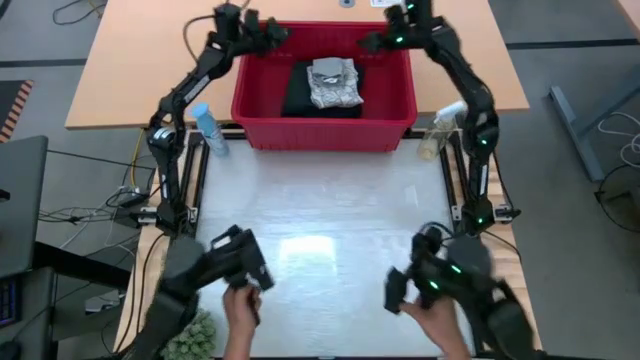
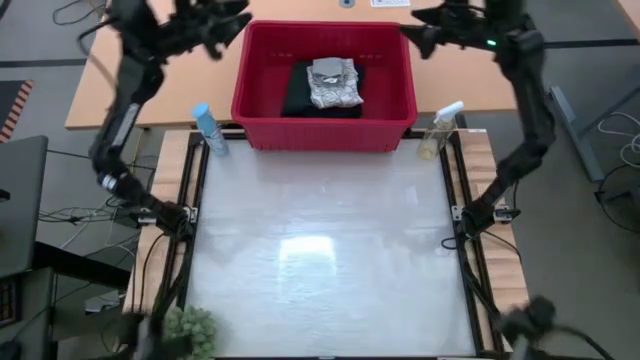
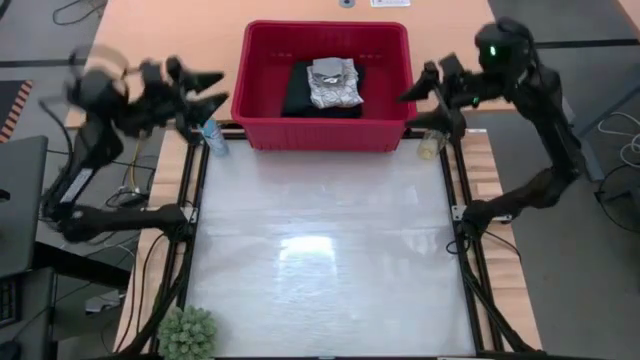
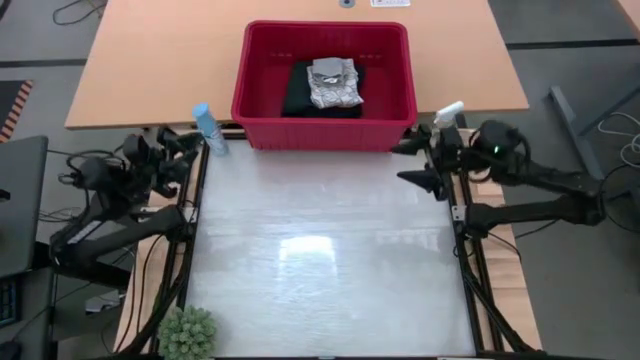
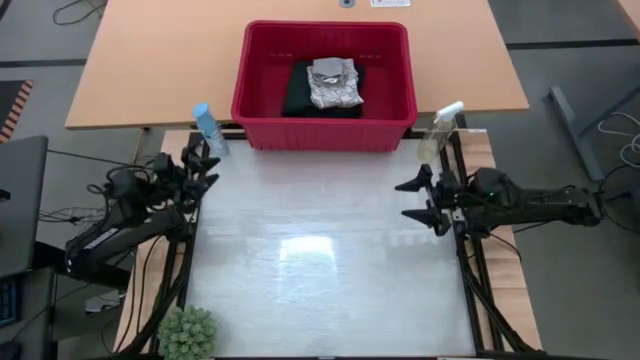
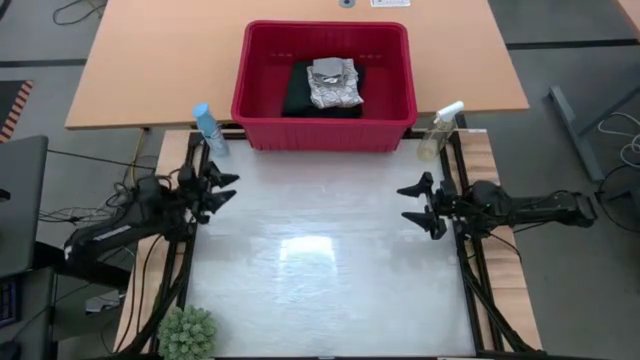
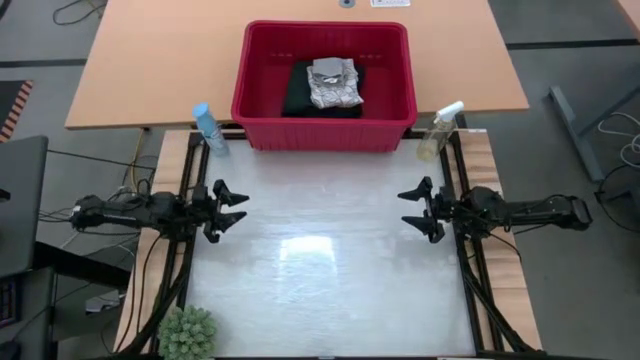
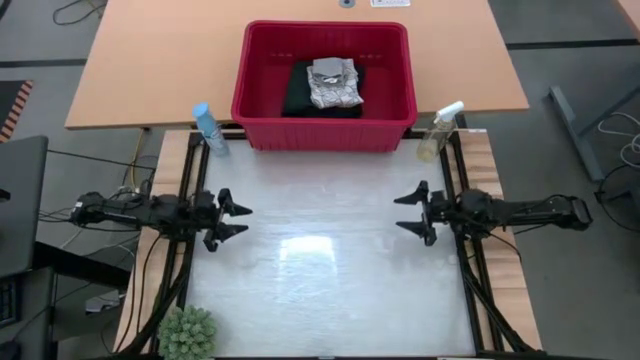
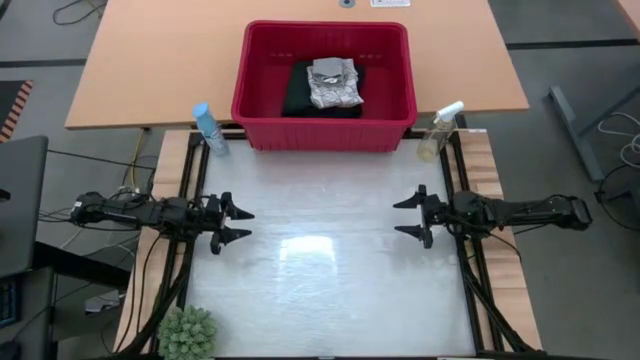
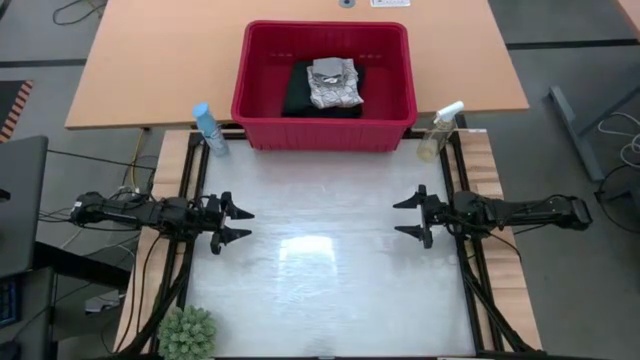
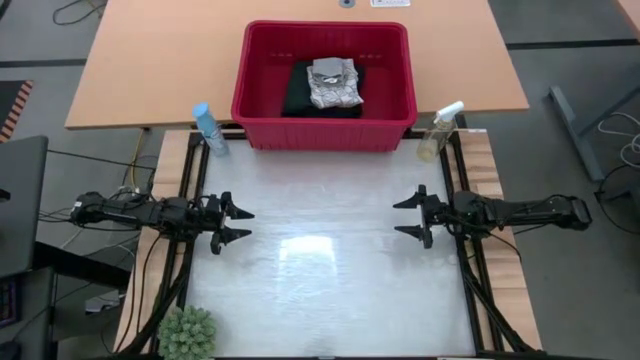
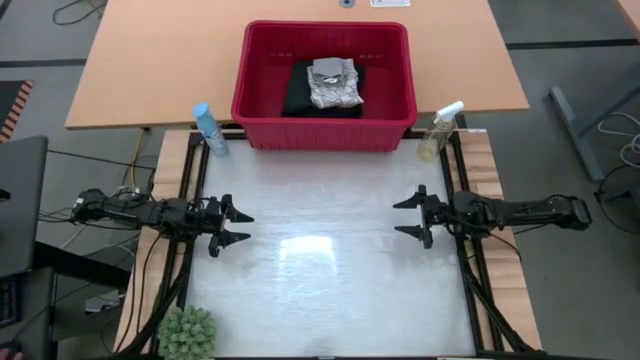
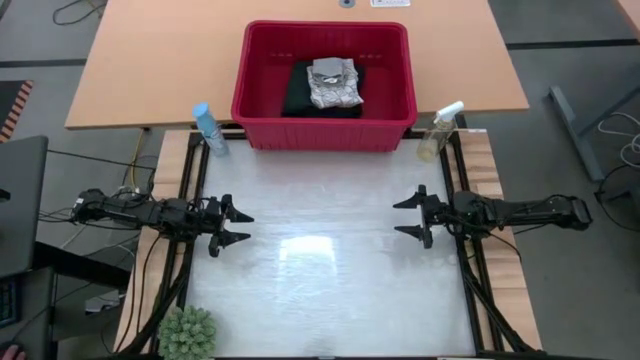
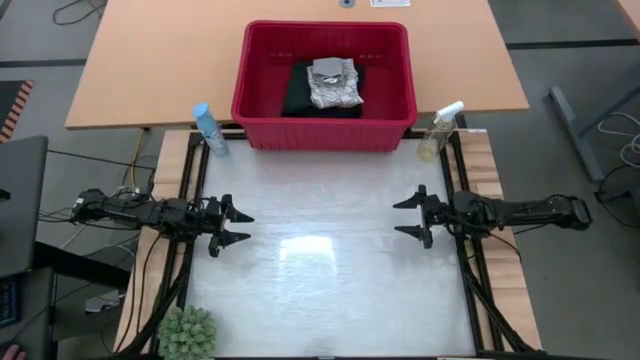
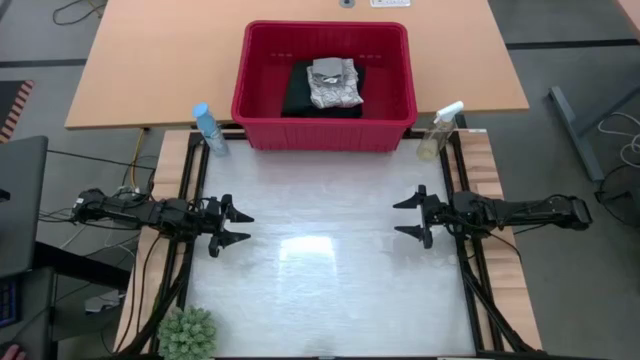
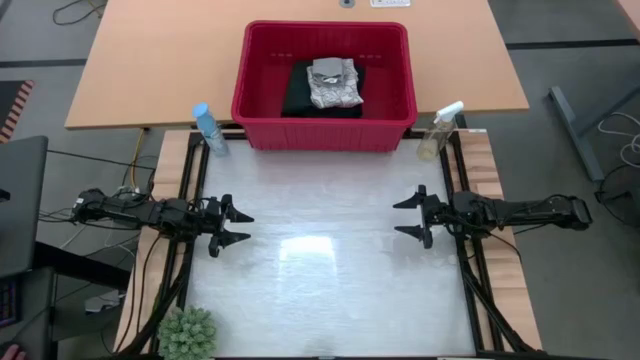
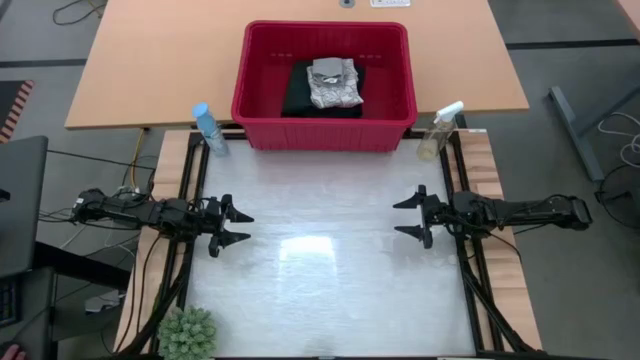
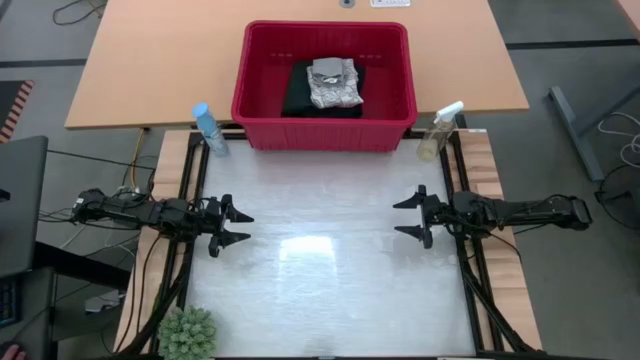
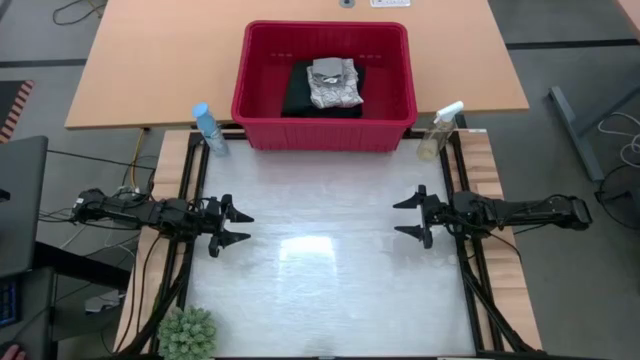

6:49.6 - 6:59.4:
Task: Fold laundry
Return to Home Position

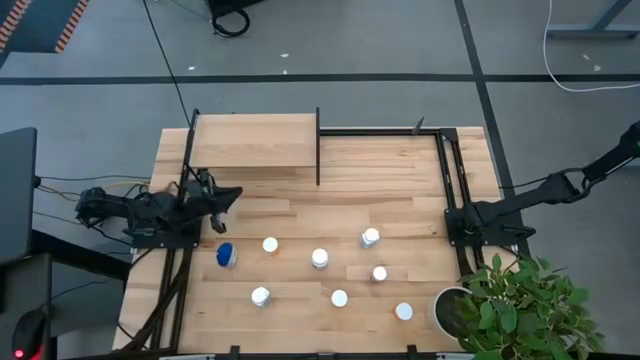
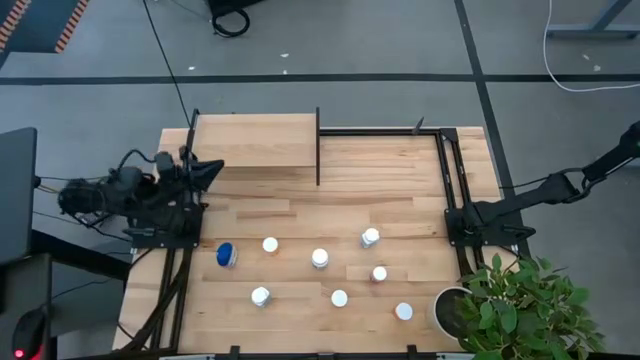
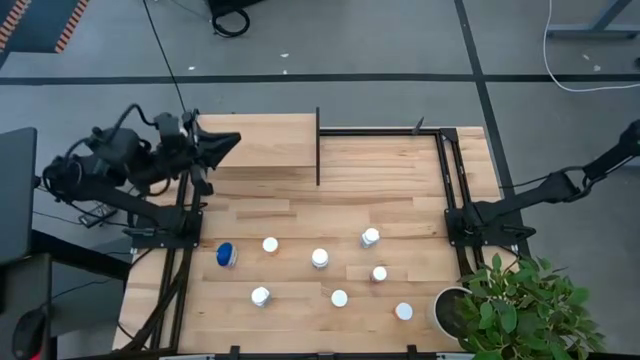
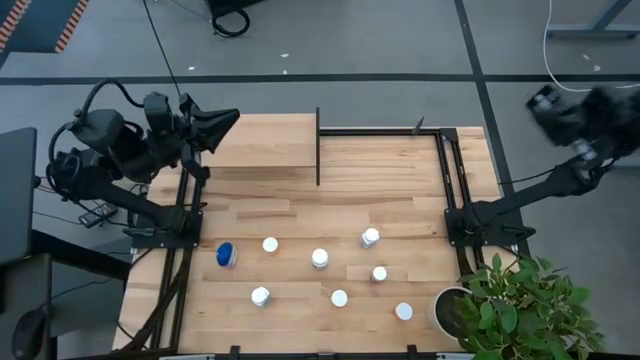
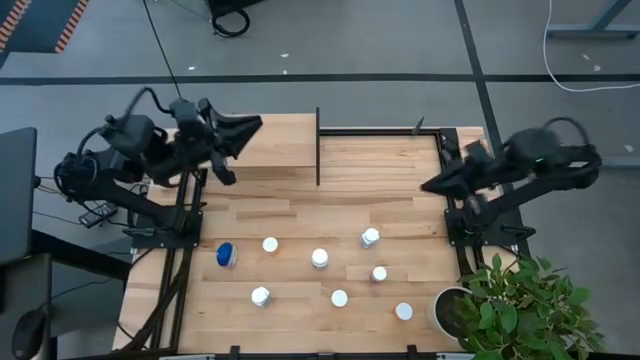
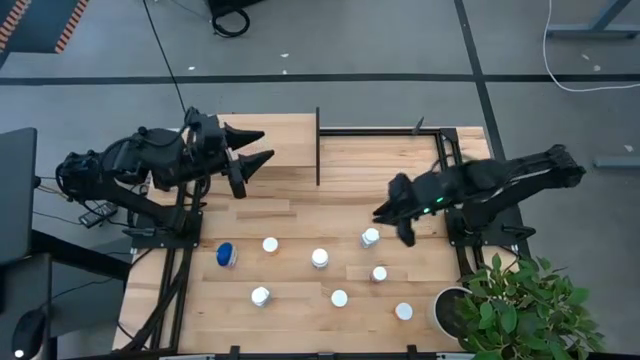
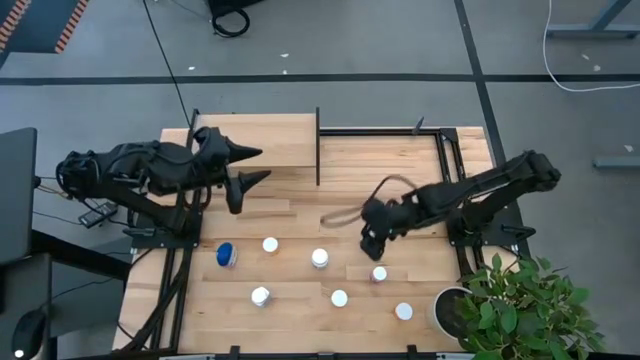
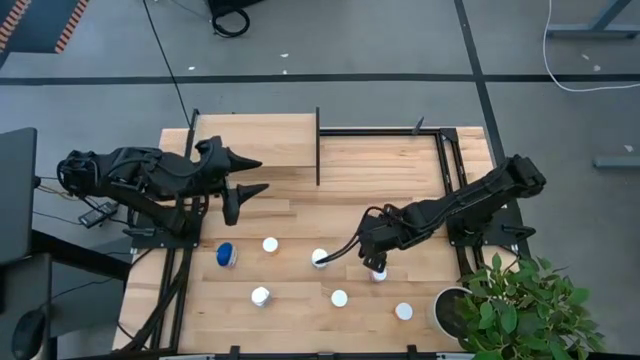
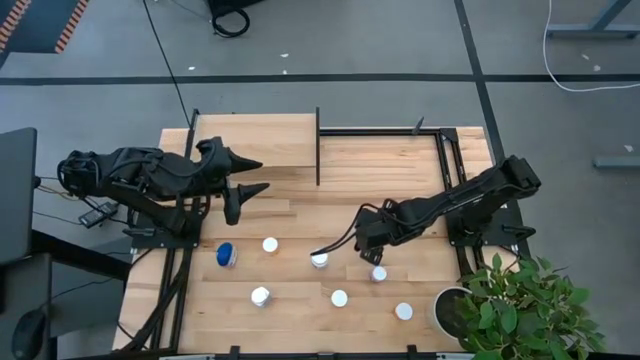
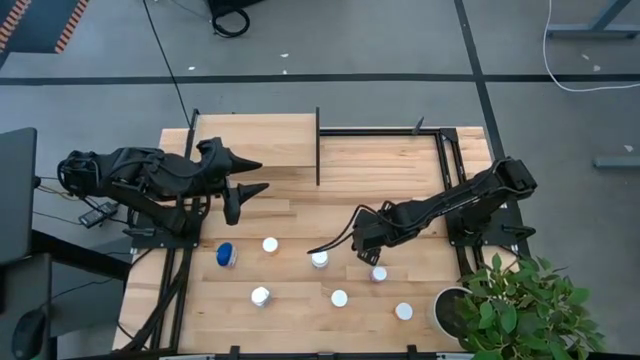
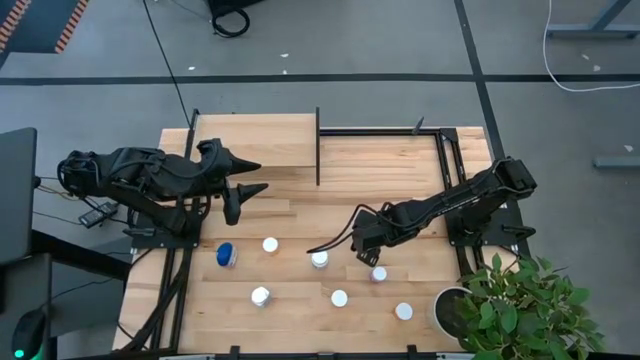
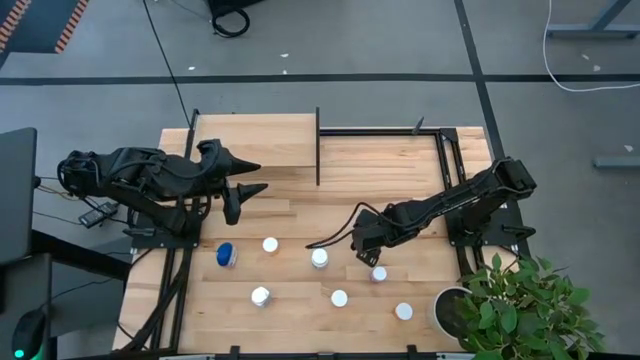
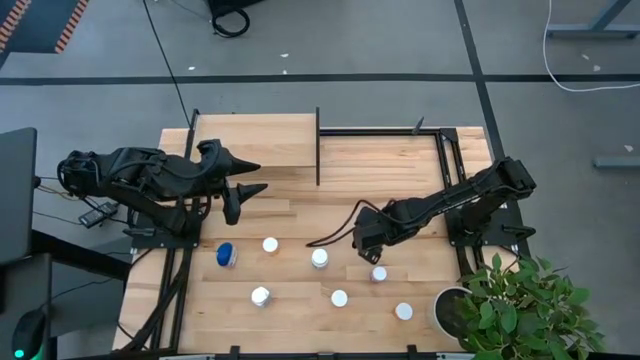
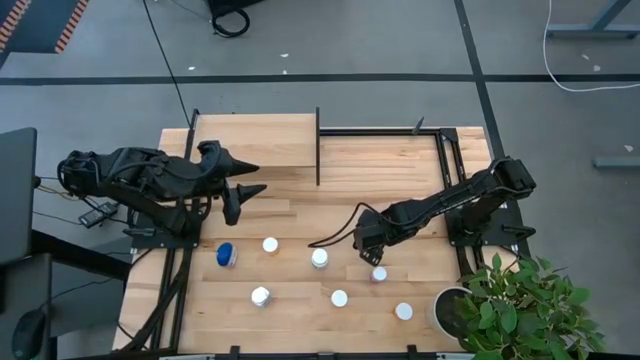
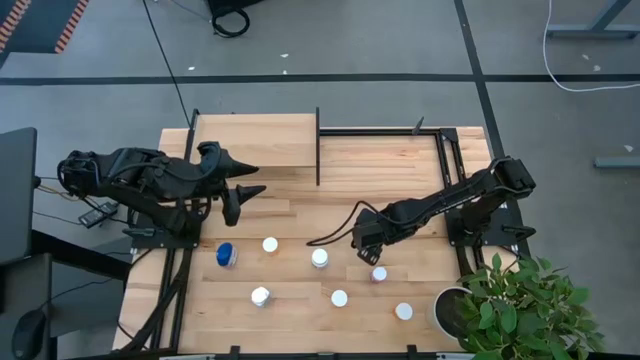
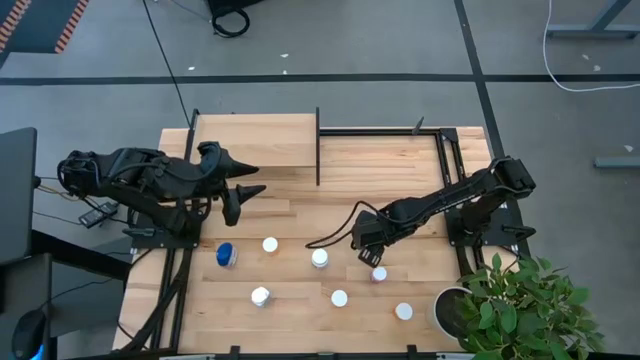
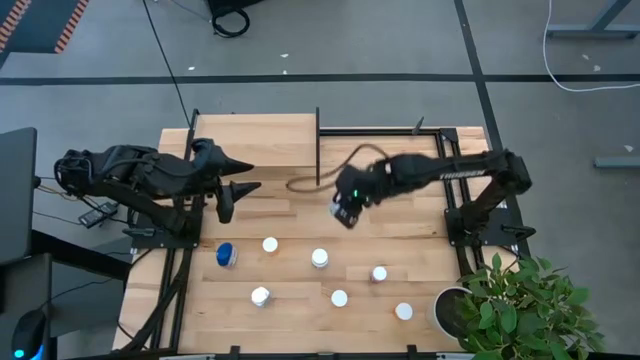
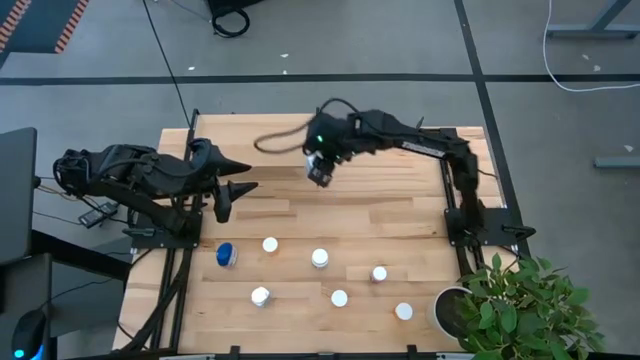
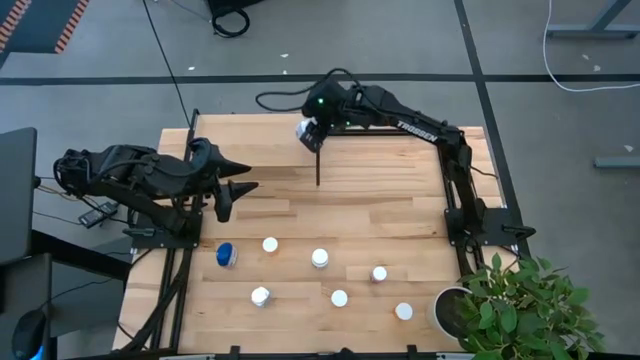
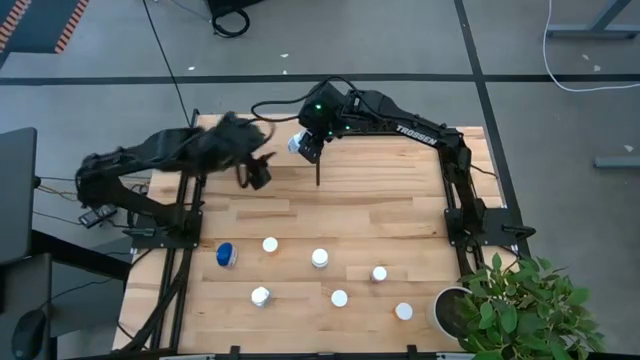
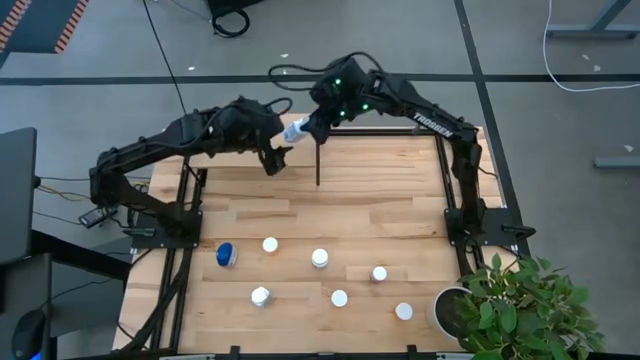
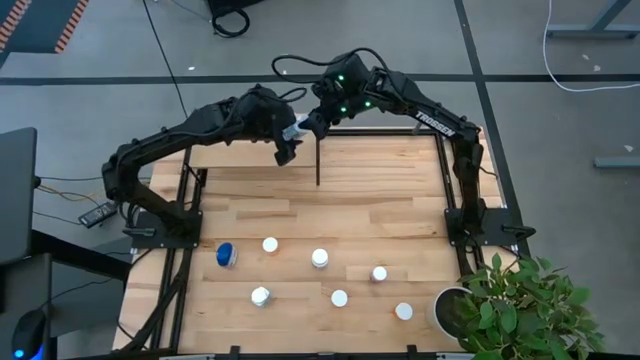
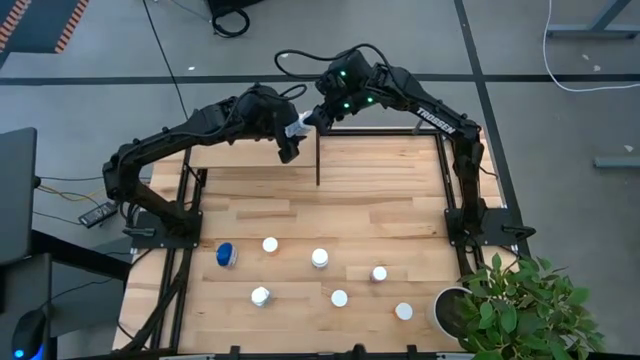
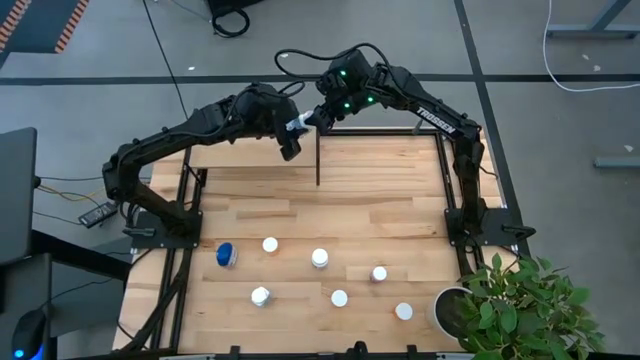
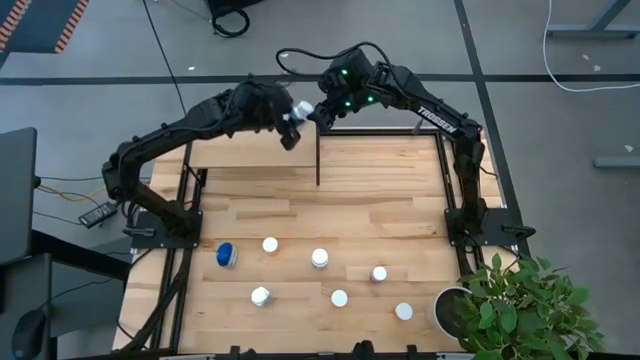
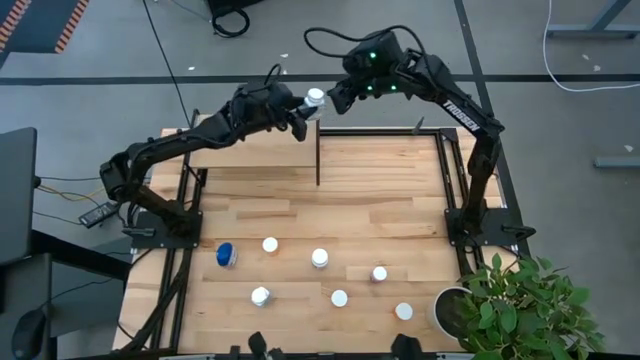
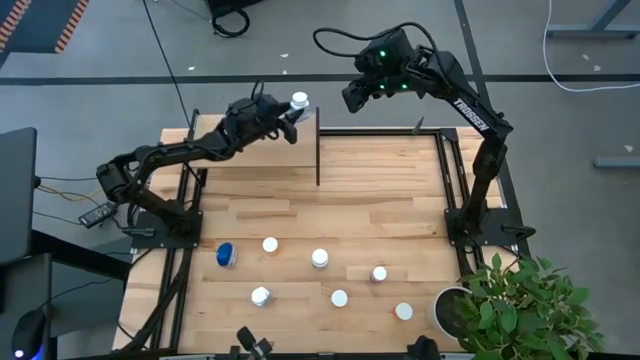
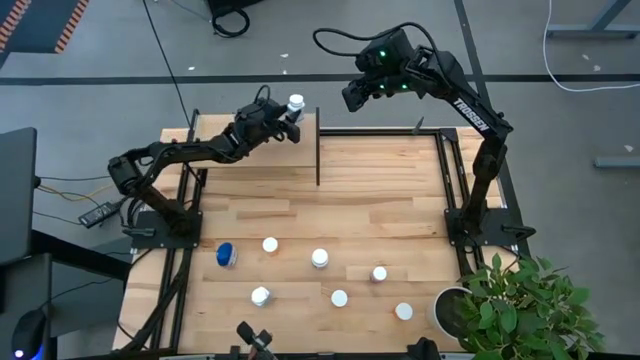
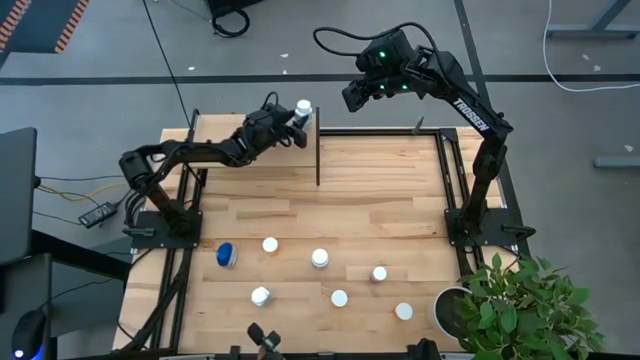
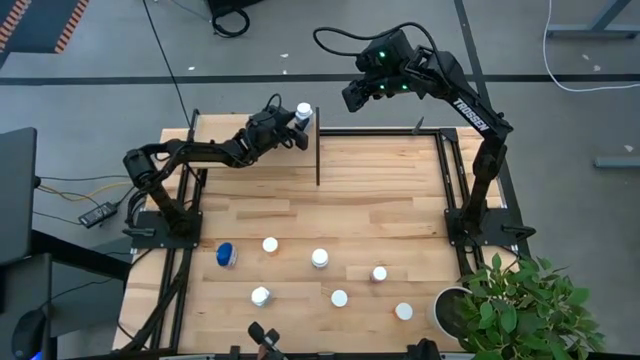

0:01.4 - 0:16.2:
Task: Pick and place medicine bottles onto shelf by color
Put the right white pill bottle on the shelf
